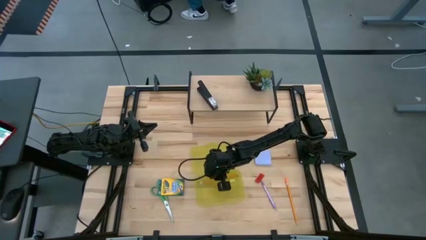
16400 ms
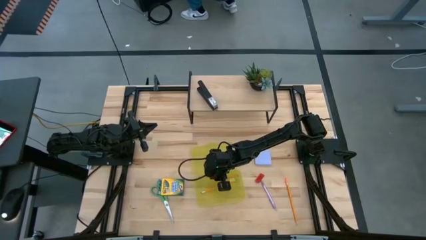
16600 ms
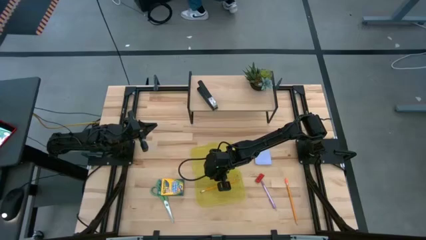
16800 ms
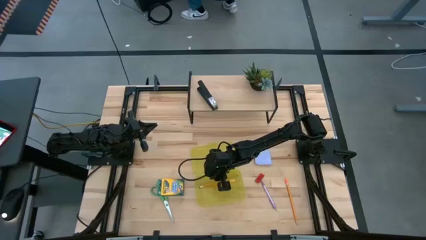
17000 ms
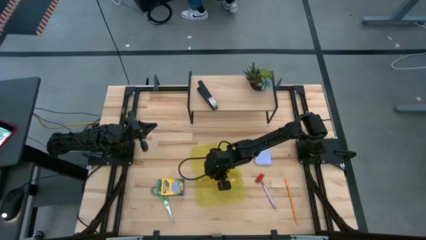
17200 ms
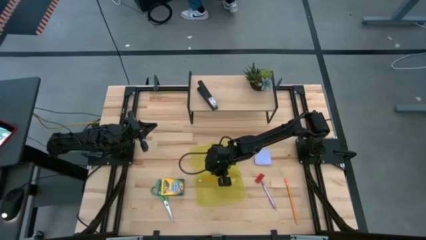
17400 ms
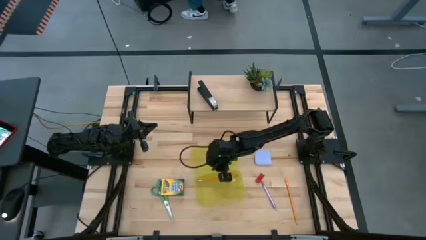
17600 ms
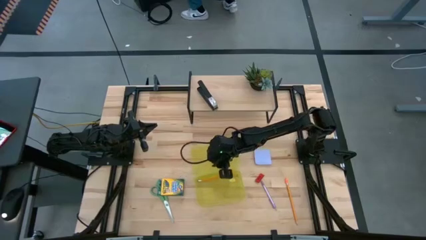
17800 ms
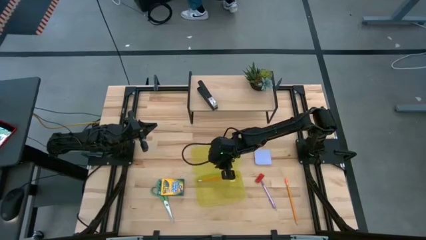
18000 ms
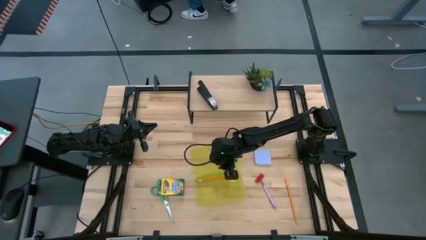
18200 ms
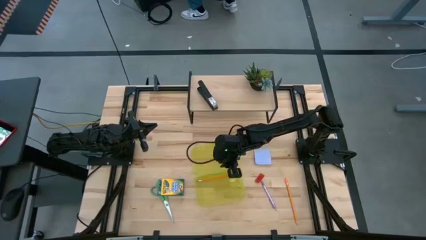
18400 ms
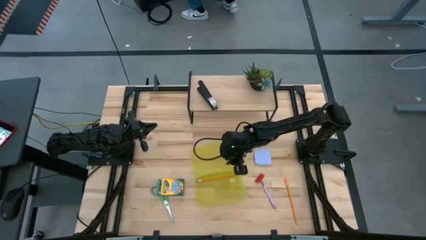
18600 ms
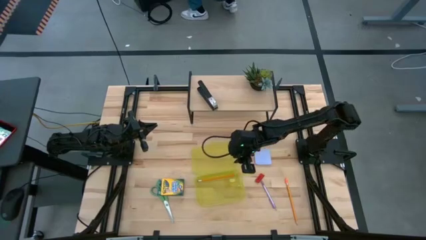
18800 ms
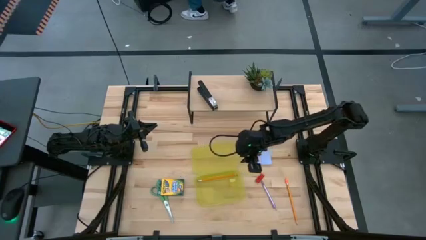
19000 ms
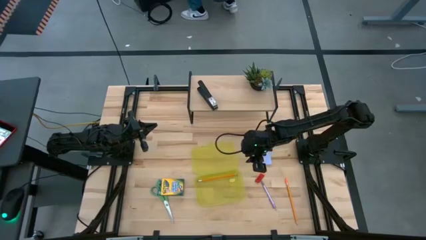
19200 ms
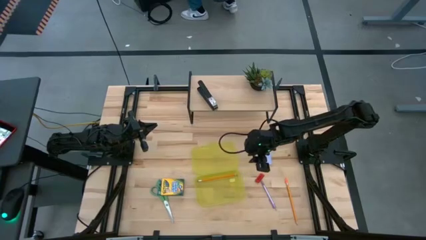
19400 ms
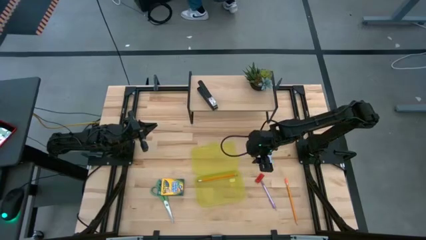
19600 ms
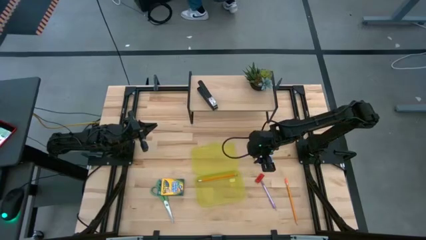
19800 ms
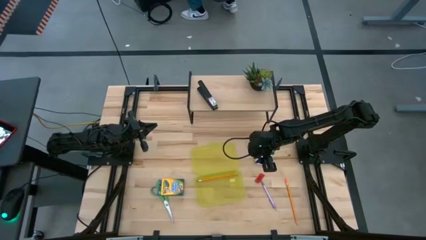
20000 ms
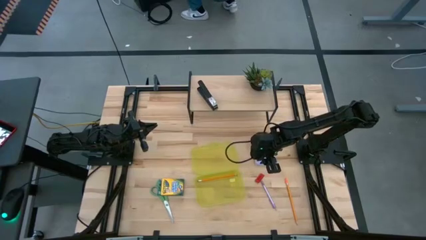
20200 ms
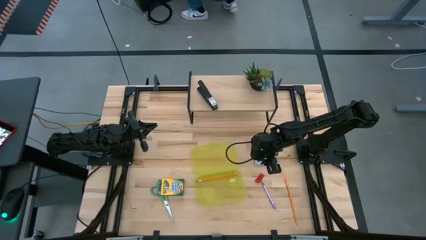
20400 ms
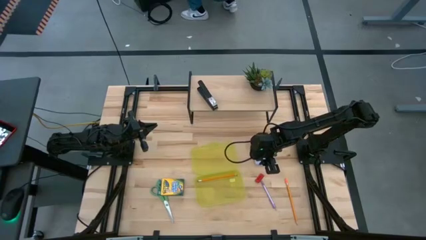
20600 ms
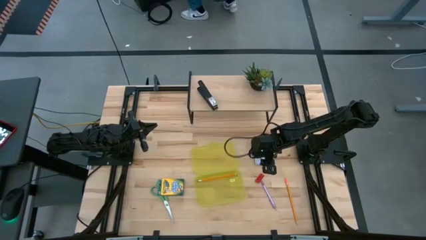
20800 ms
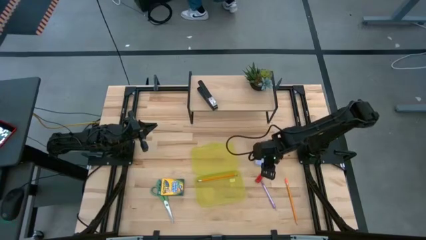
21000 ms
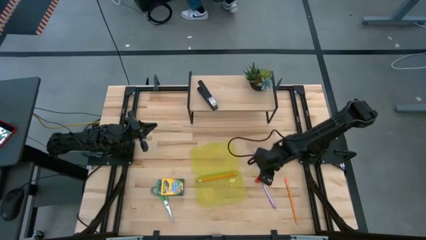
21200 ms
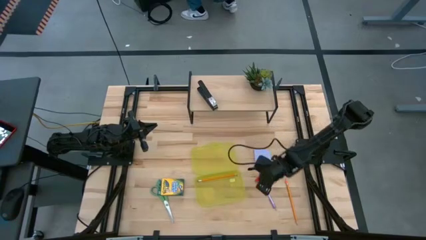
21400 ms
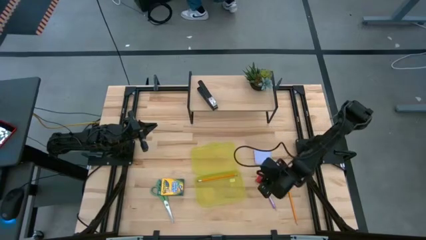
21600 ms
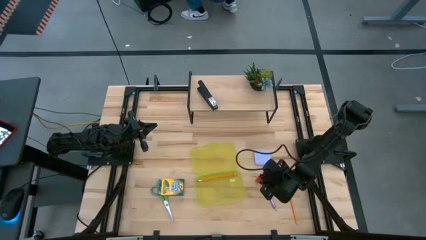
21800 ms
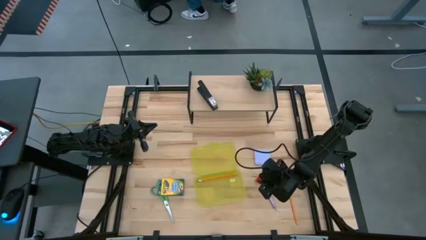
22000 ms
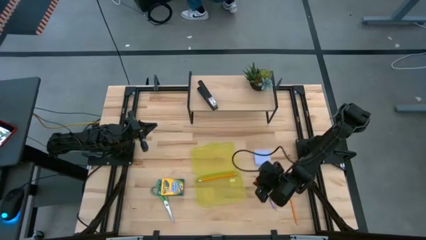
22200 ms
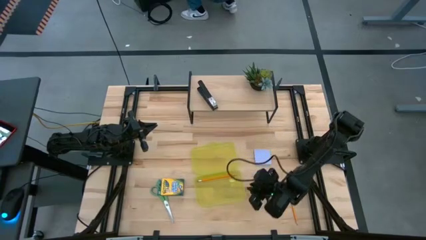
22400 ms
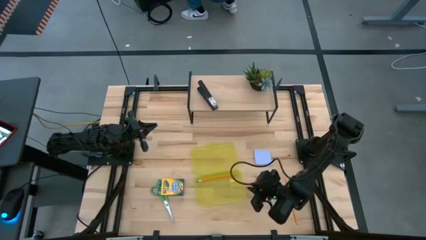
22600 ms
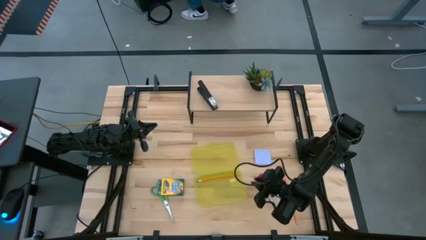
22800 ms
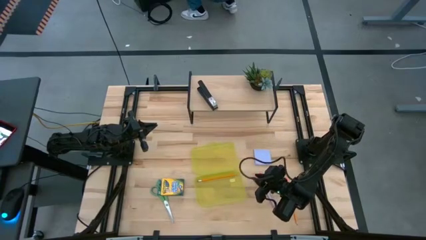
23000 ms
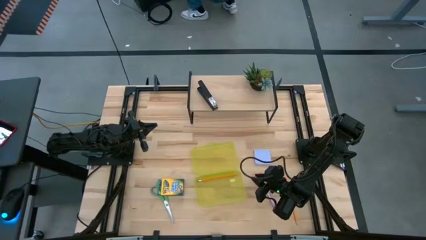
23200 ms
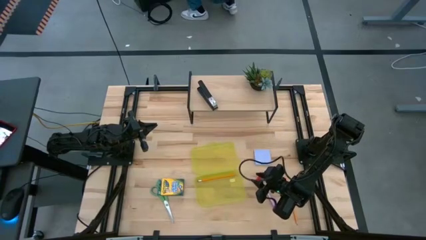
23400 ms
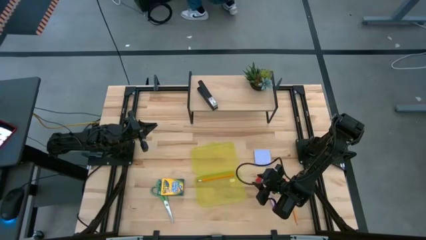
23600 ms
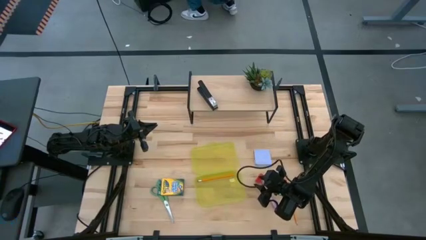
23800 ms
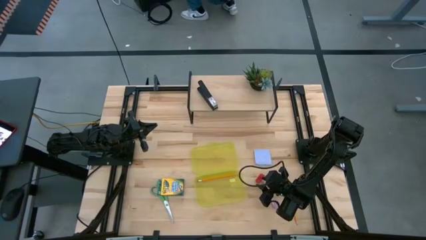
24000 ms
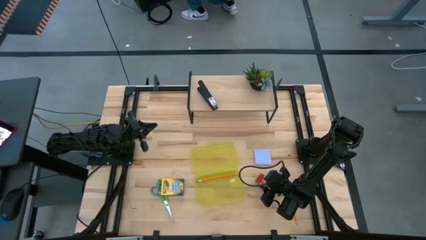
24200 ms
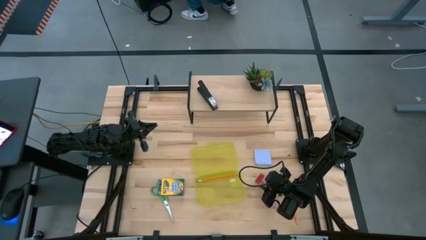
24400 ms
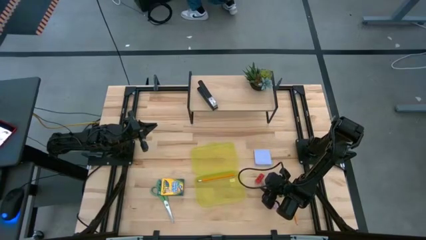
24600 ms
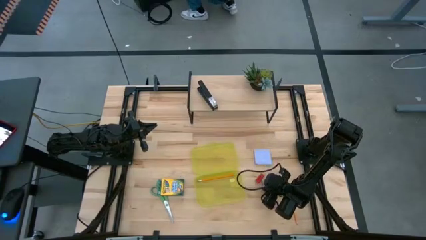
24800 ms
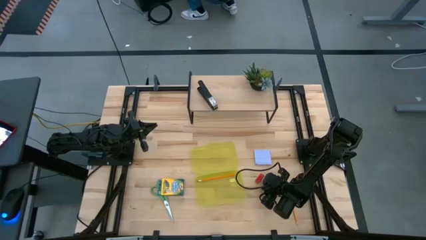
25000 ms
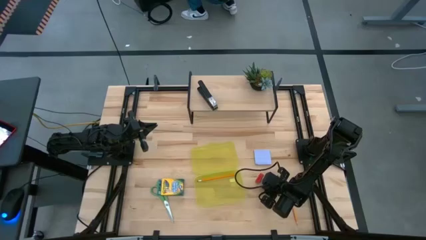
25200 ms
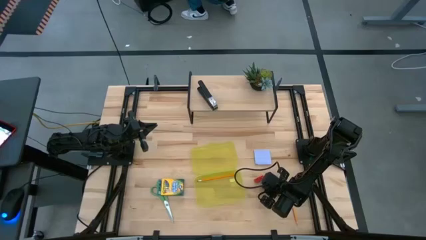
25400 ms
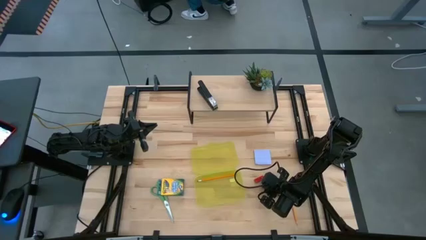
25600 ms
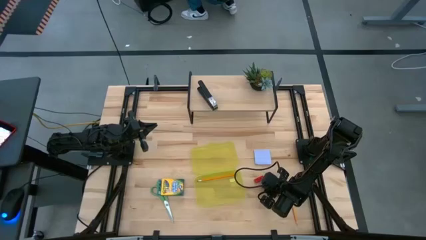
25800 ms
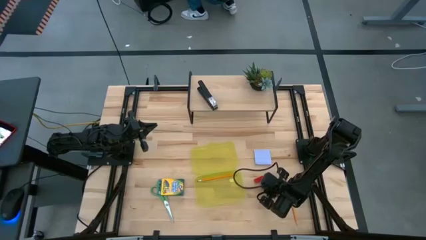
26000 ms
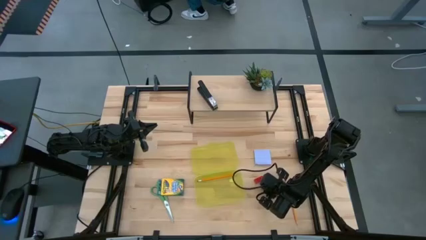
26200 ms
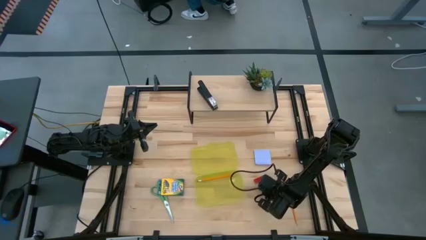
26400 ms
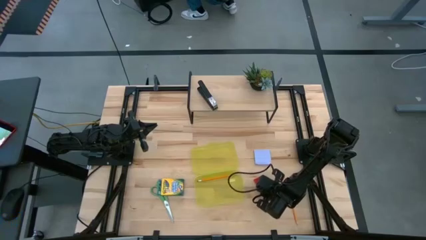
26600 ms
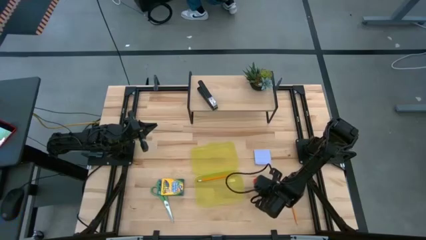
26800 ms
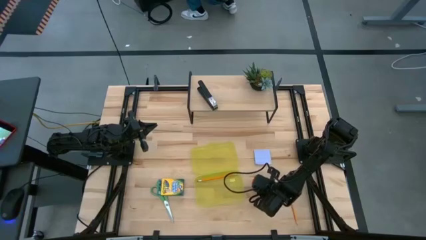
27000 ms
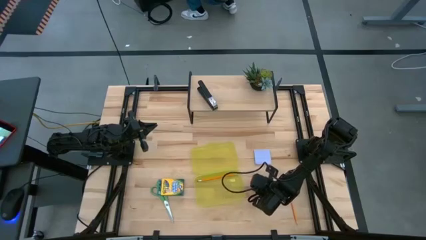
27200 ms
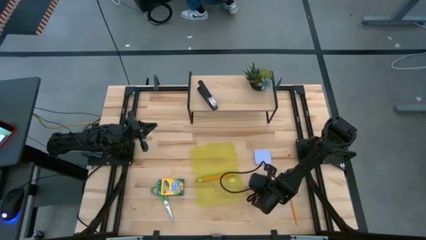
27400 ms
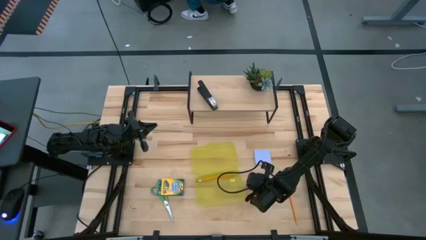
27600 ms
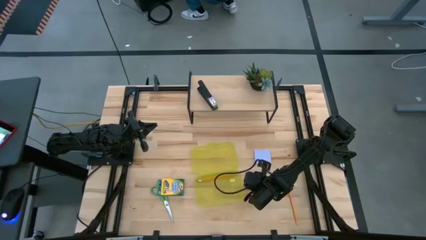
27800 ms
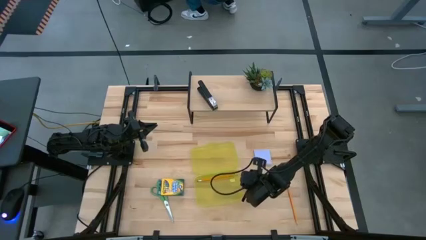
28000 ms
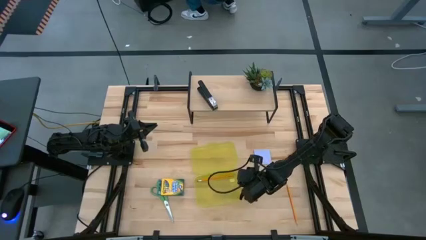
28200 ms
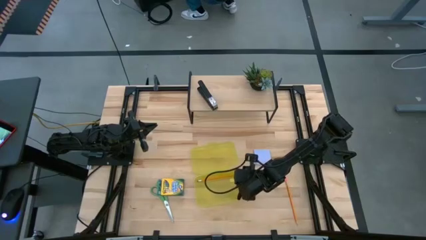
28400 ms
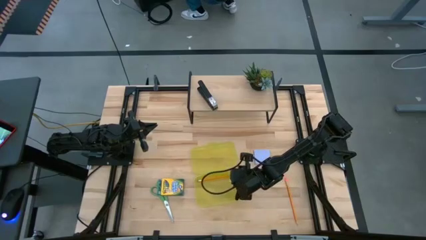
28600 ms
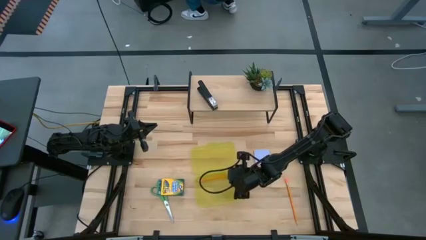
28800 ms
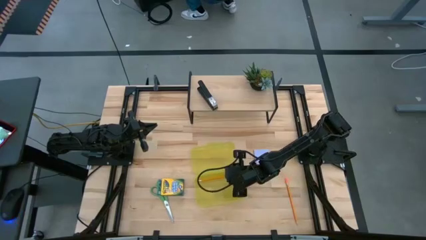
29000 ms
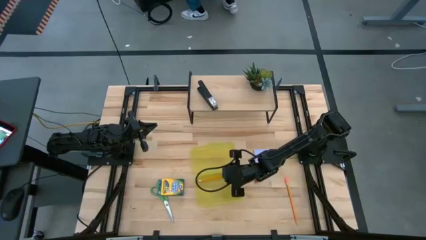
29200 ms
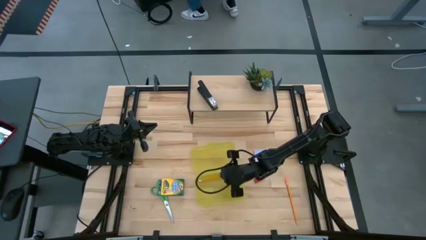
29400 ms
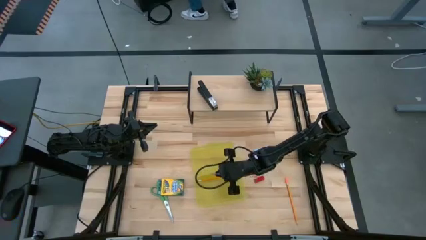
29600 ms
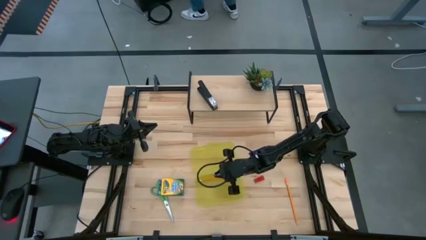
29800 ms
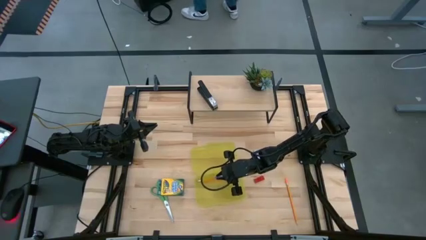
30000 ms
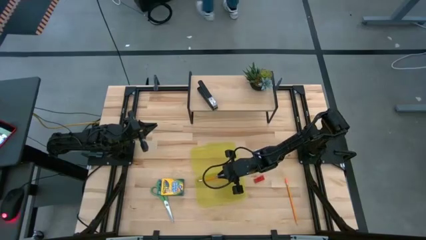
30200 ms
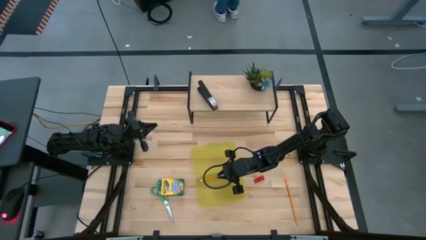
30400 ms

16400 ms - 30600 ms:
Task: Pack school essentials
Put the purple pen into the yellow supply box
